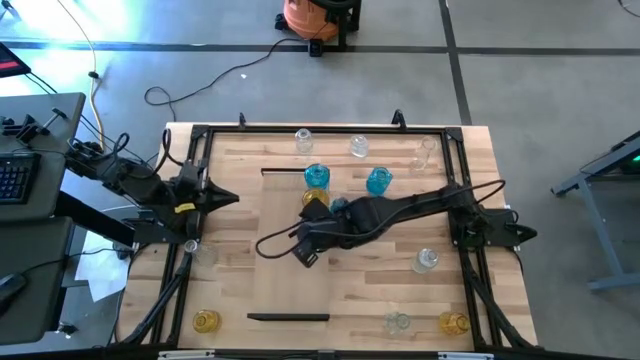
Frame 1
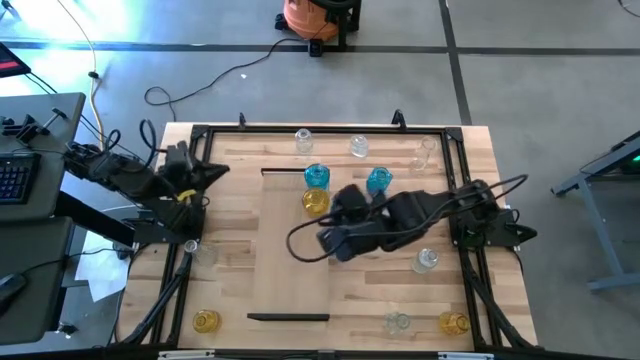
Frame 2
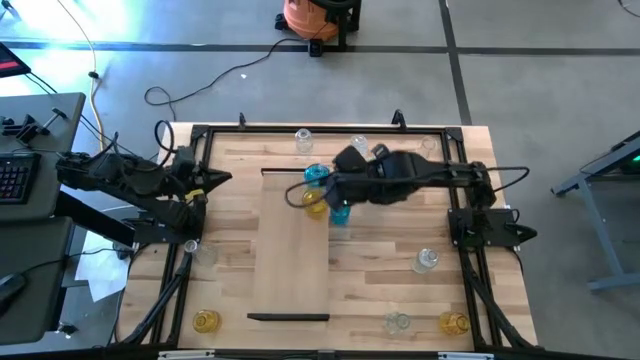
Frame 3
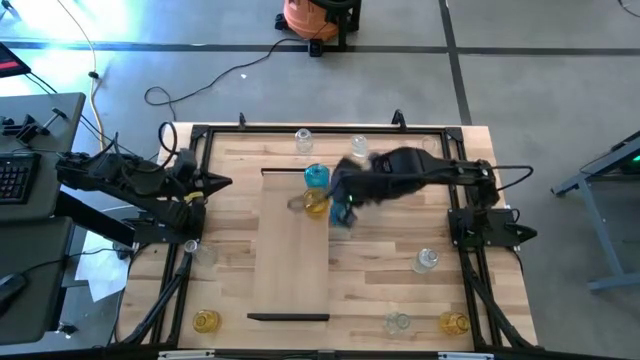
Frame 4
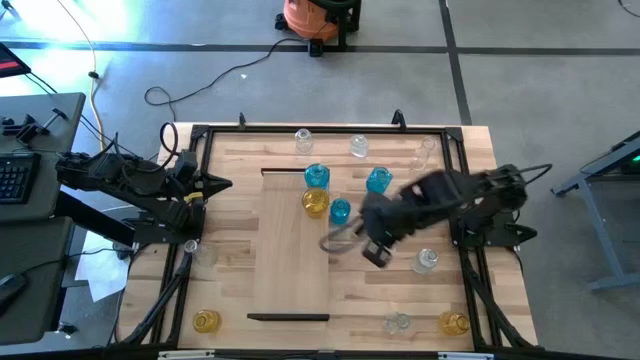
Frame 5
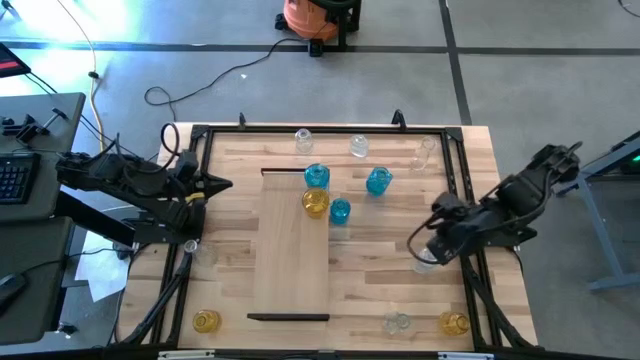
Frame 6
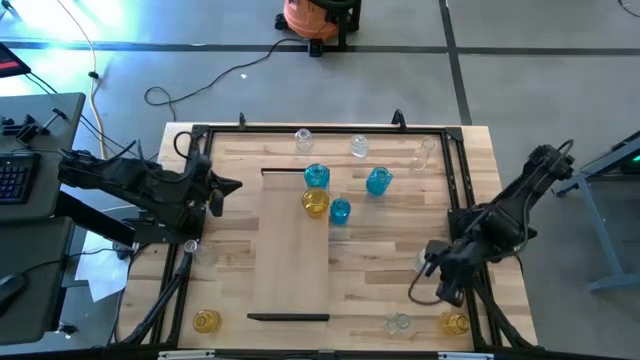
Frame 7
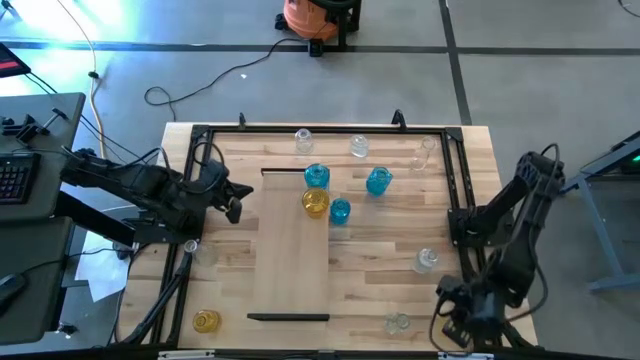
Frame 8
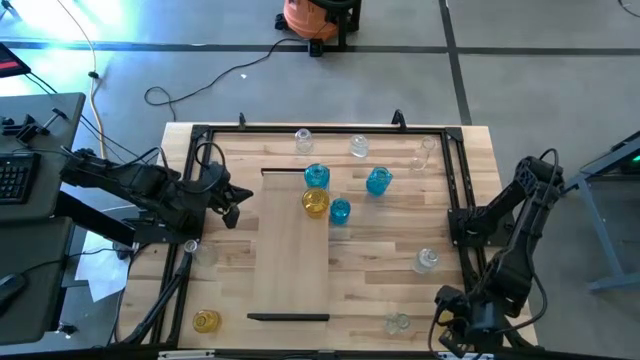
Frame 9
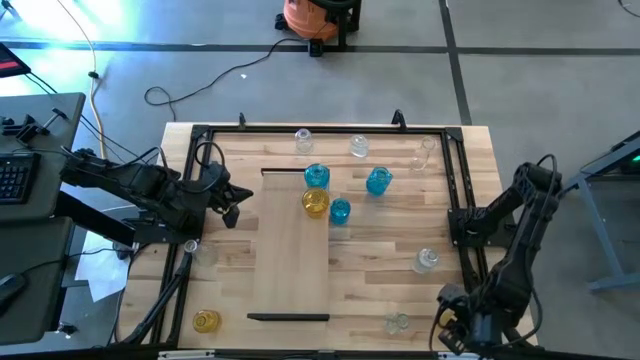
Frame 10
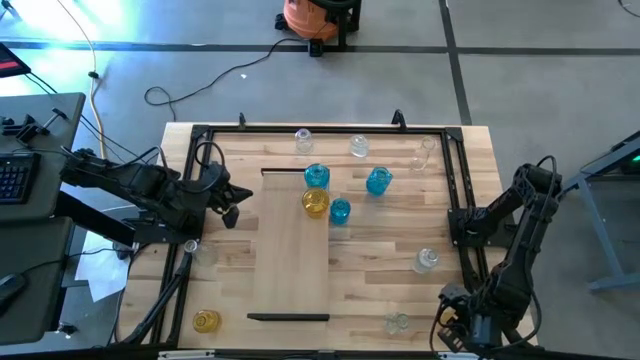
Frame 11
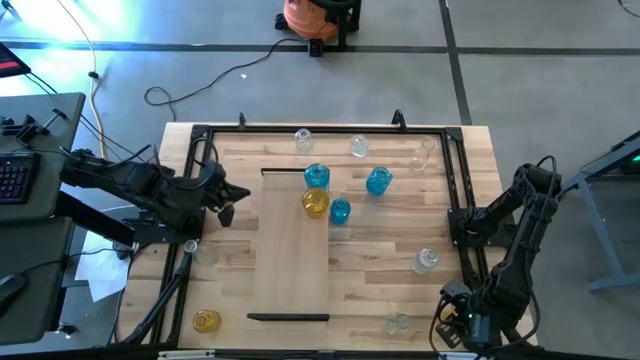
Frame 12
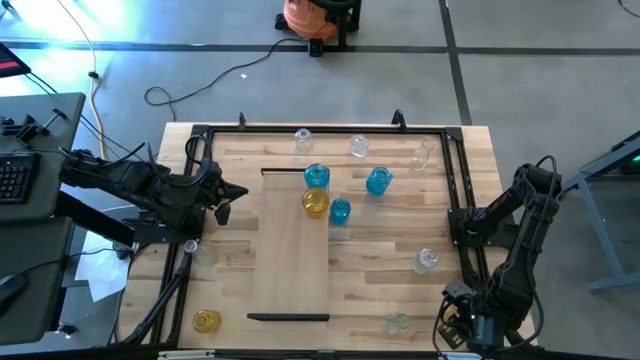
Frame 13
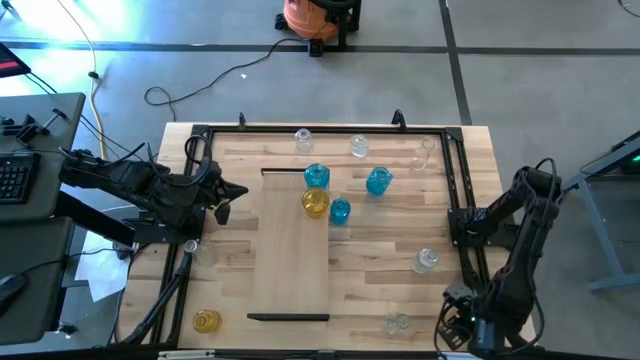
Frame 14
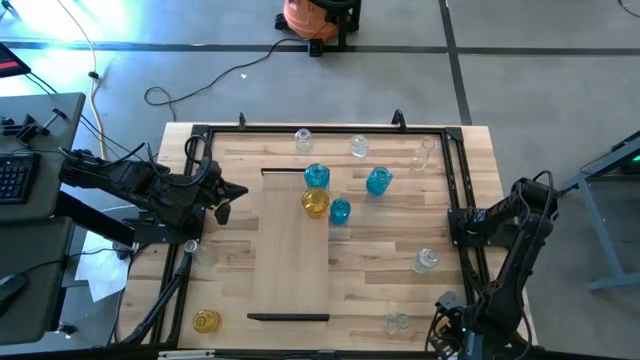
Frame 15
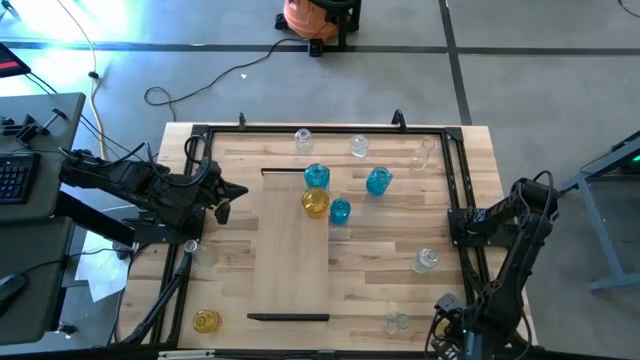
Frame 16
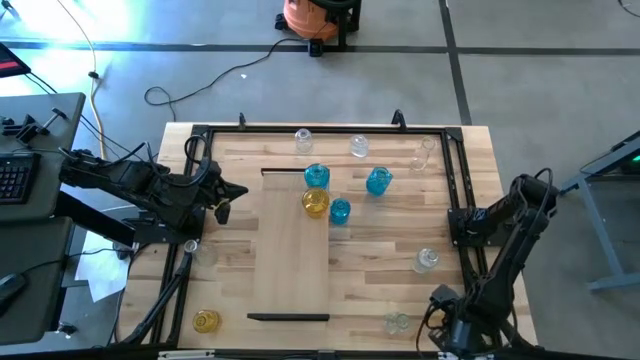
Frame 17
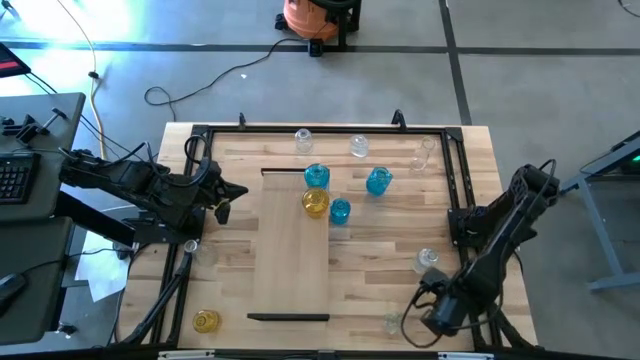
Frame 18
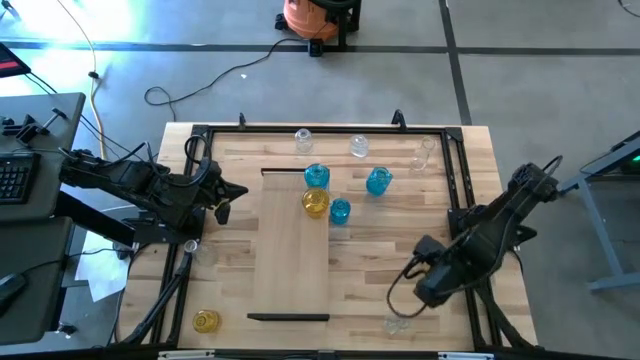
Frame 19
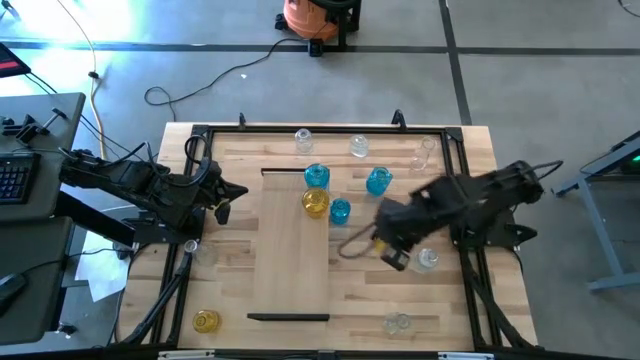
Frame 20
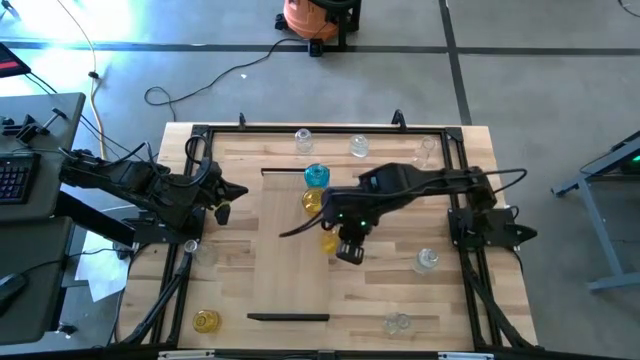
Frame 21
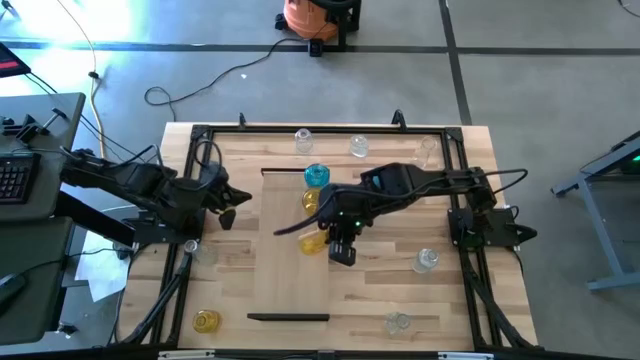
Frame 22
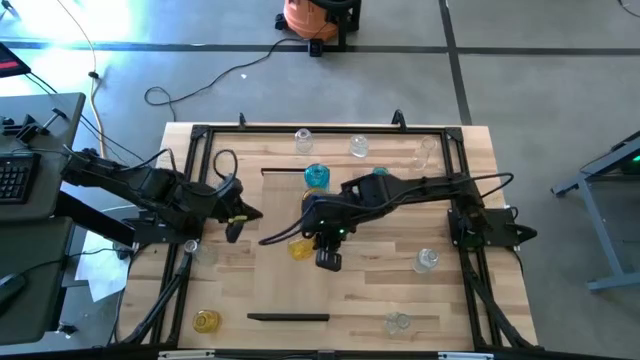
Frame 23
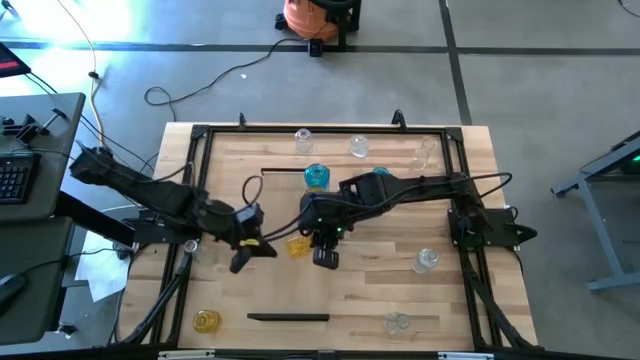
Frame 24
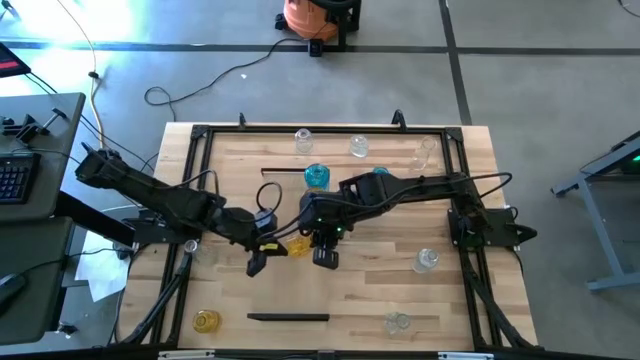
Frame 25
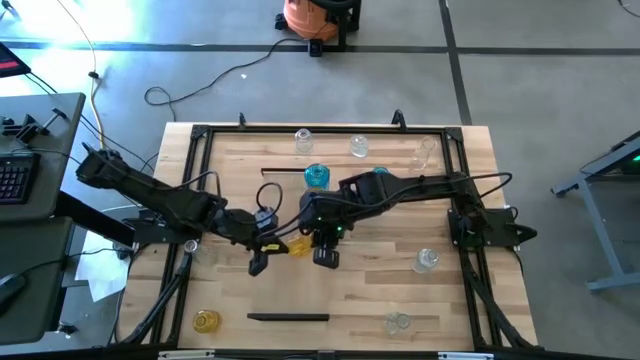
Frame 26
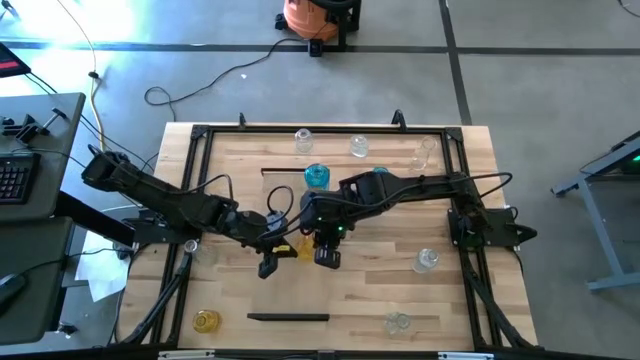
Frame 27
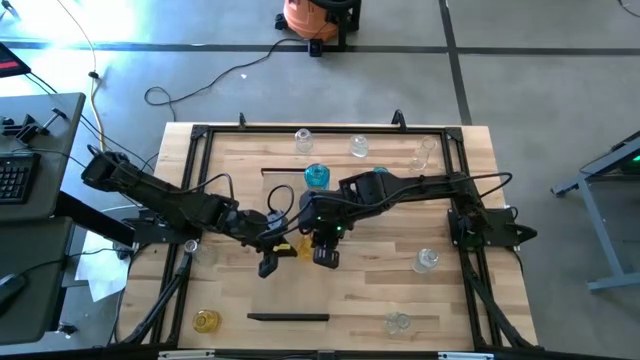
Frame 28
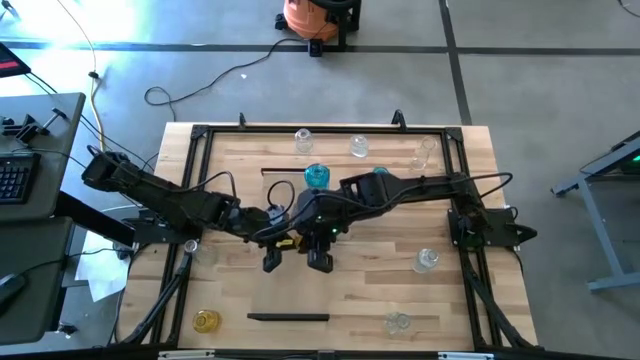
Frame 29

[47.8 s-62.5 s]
Task: sort vases onto shelf
Put the right yellow vase on the shelf to align with the other yellow vase

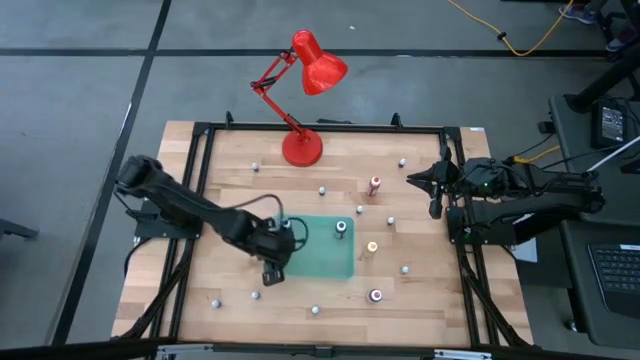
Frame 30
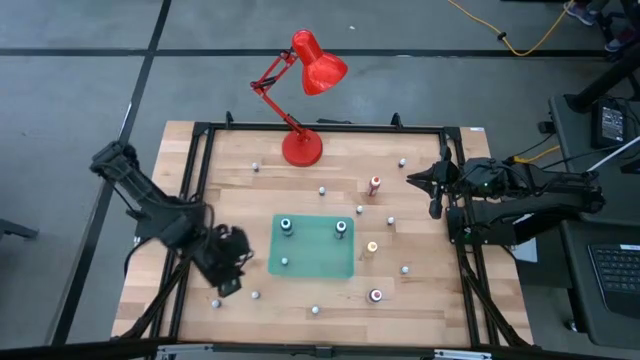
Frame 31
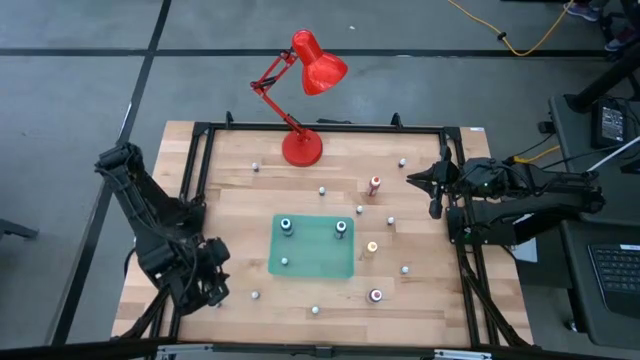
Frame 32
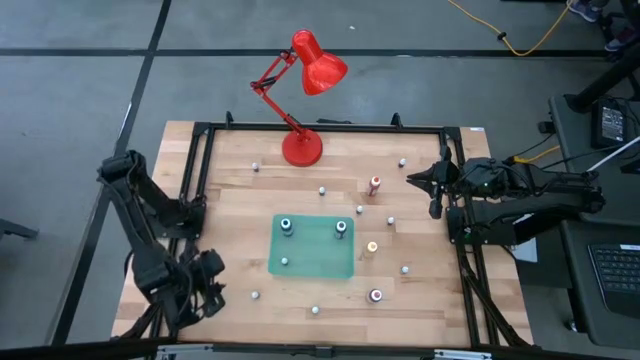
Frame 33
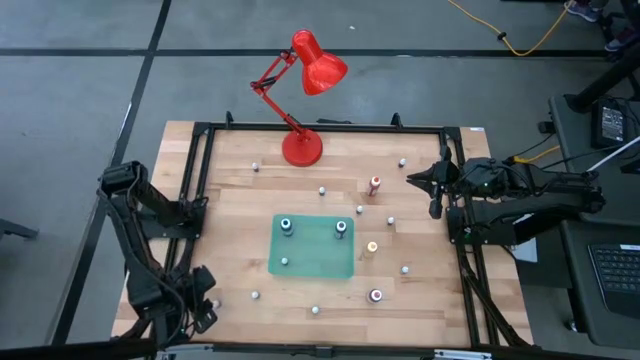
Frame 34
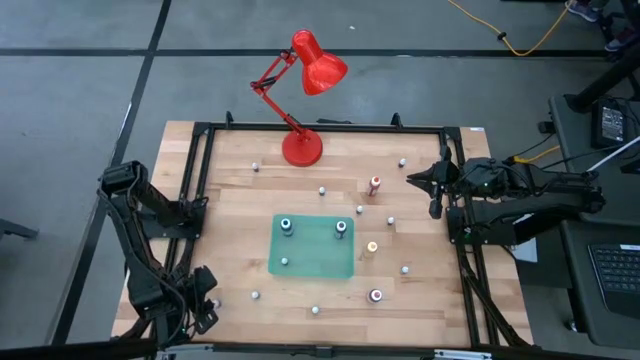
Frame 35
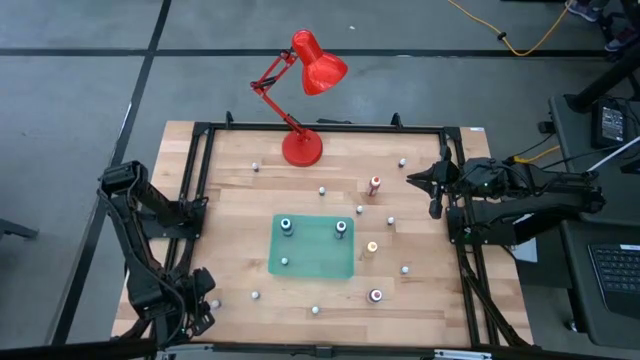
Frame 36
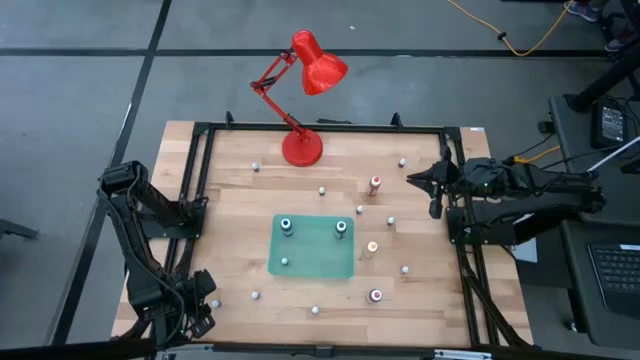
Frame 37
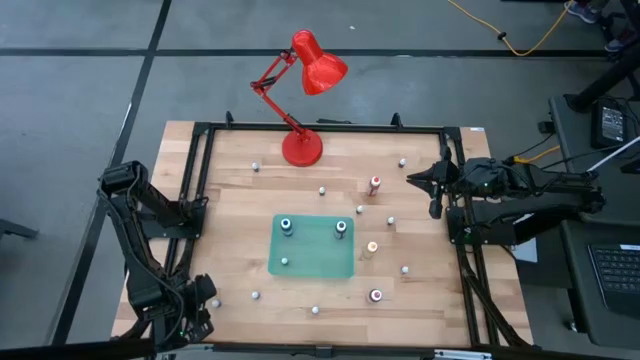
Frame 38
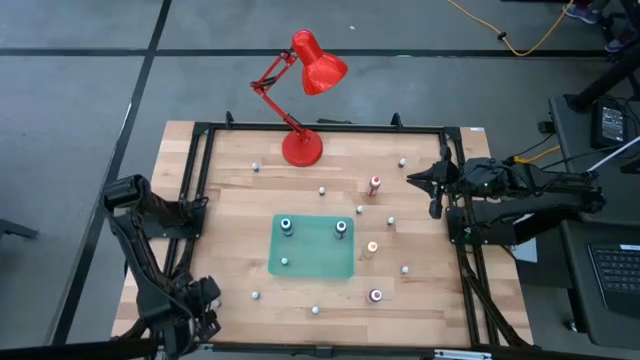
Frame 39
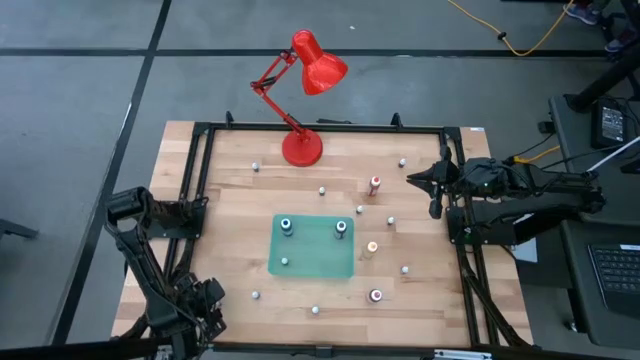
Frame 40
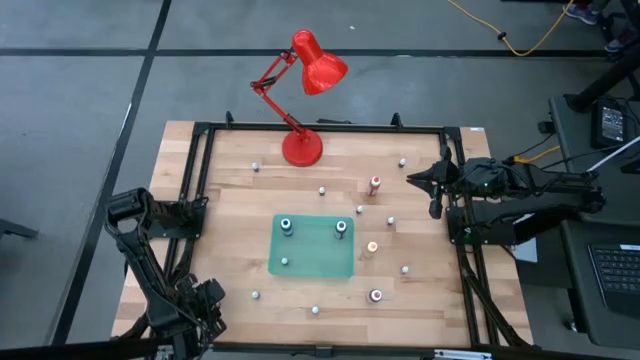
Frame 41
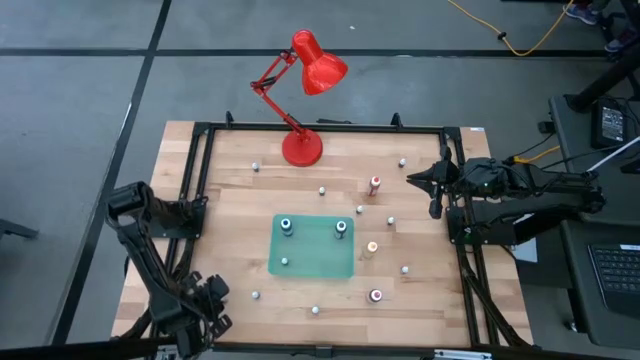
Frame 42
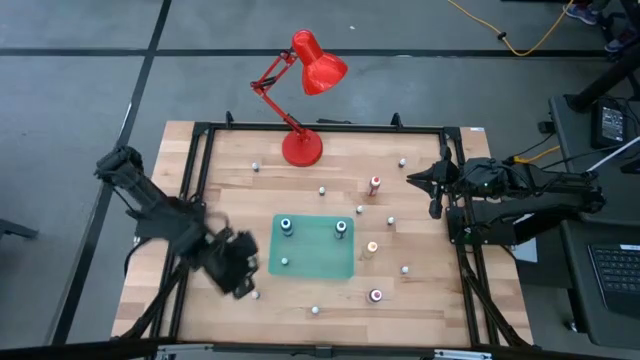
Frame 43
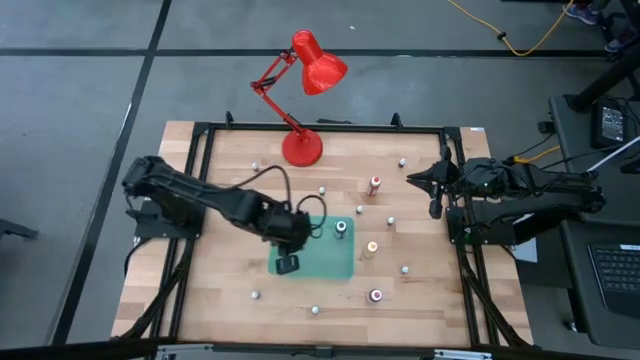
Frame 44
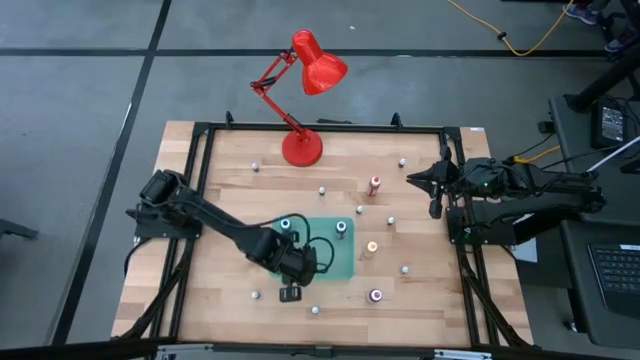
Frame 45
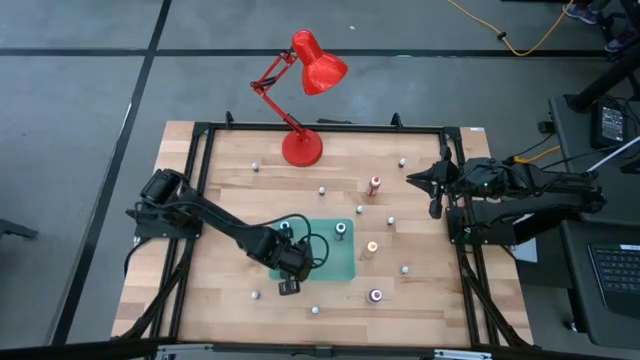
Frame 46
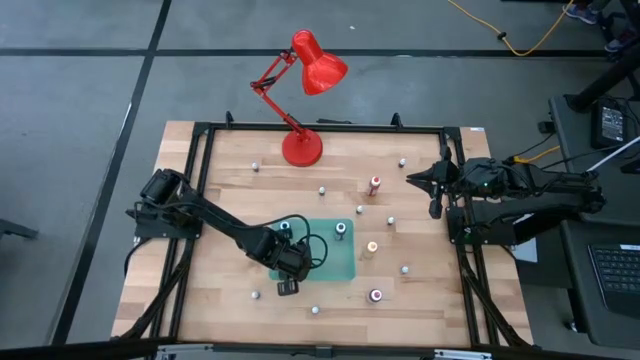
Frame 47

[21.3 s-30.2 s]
Task: Pick & Place food coloring
Put the small blue bottle into the green bin
